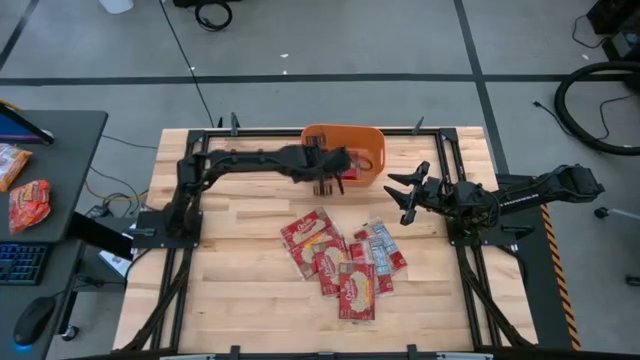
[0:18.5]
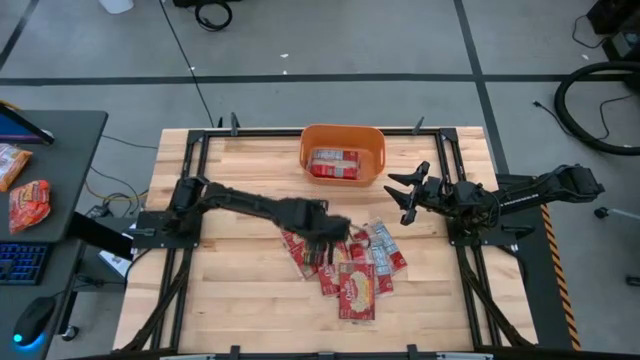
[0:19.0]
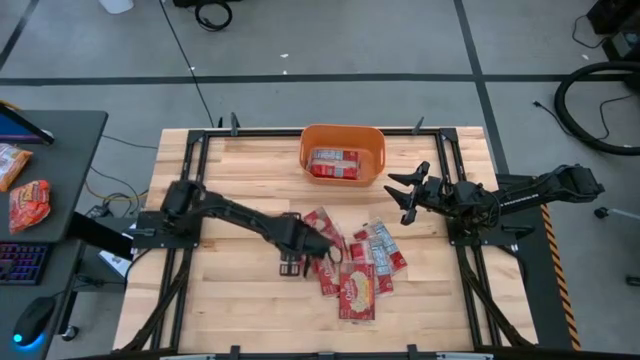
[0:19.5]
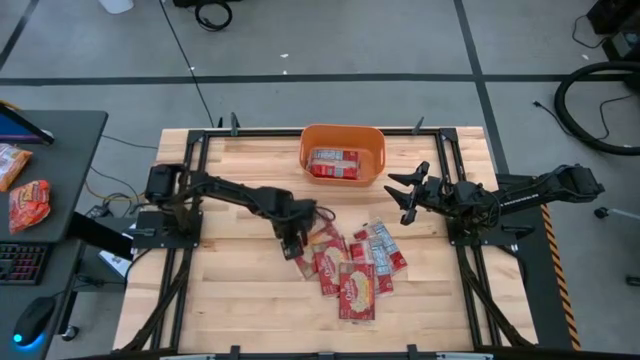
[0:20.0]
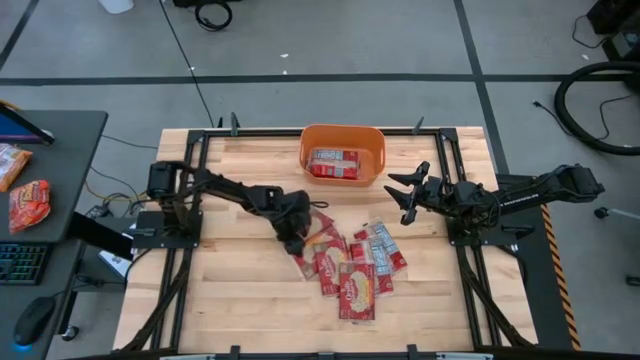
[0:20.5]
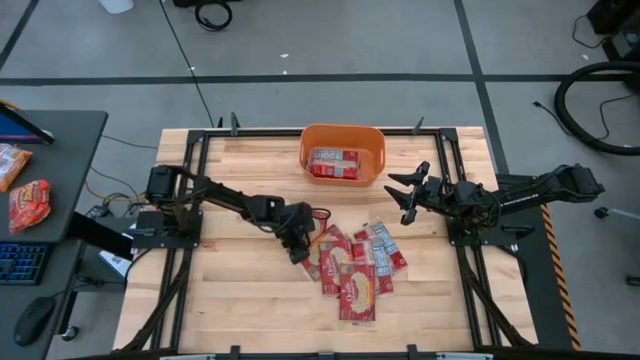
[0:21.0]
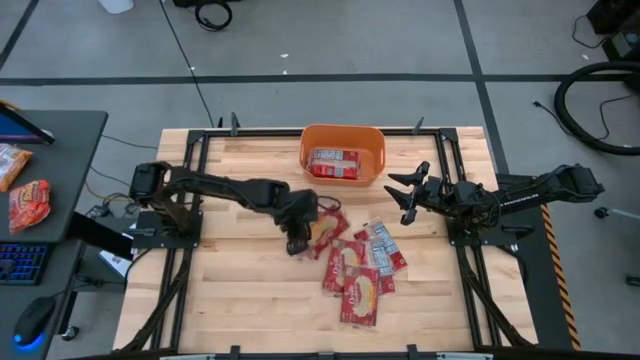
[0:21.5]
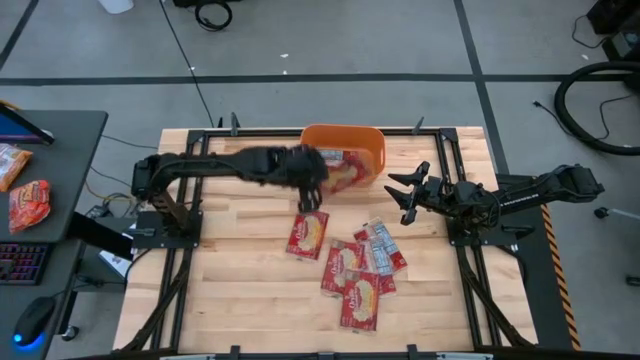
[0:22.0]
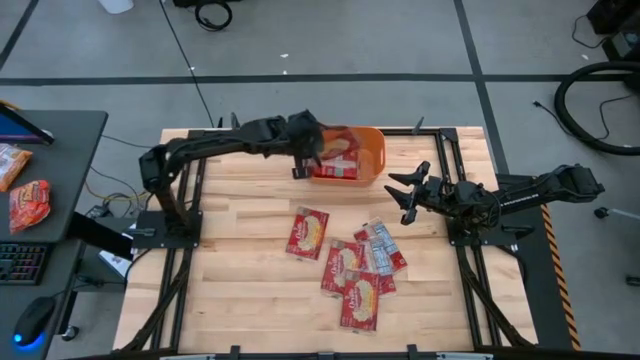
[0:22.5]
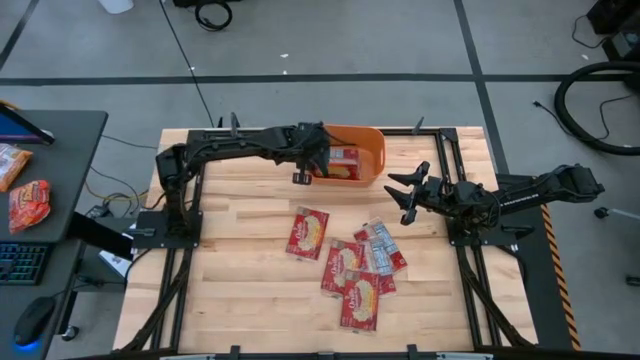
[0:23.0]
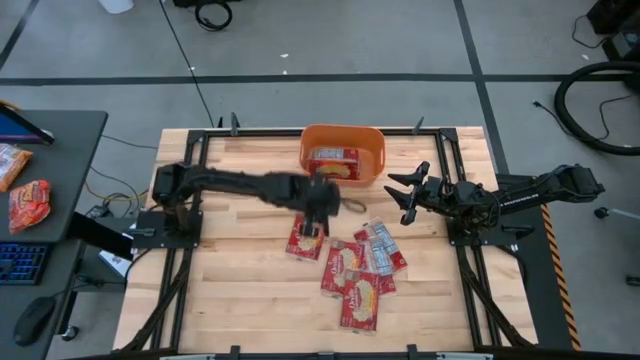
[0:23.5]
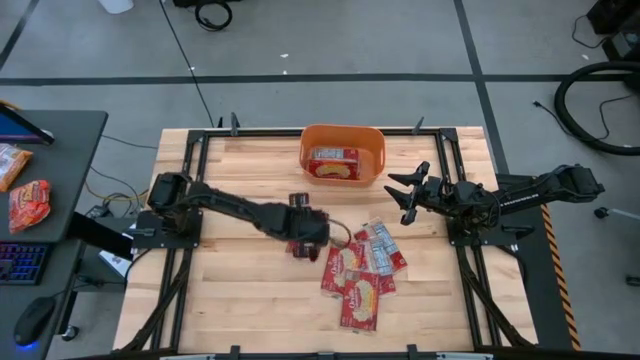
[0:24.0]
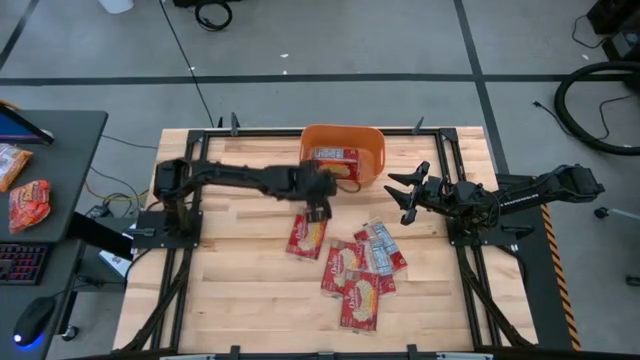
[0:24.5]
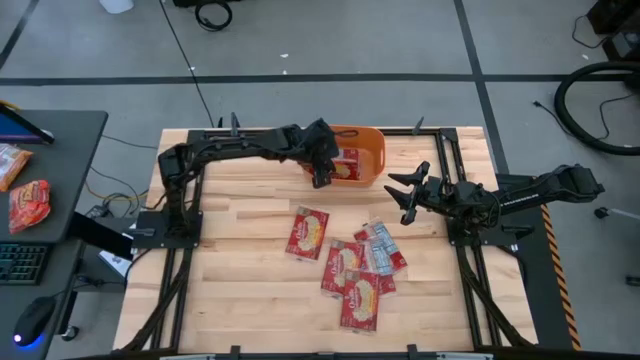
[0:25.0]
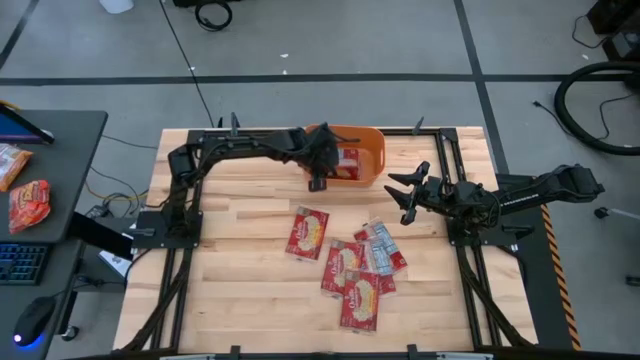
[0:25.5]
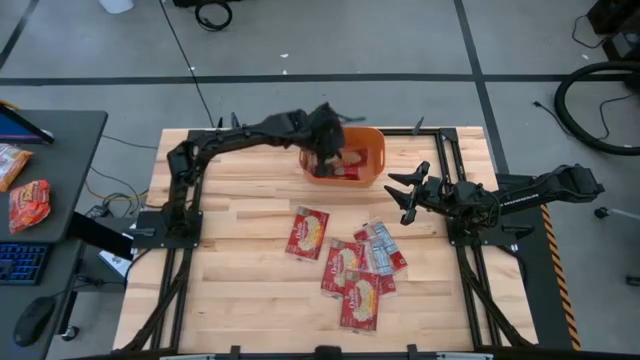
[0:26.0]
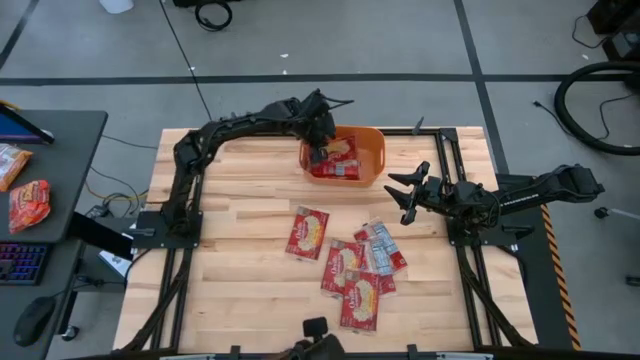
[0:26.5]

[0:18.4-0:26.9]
Task: Sort popcorn bags into baskets
Put the red popcorn bag into the orange bin

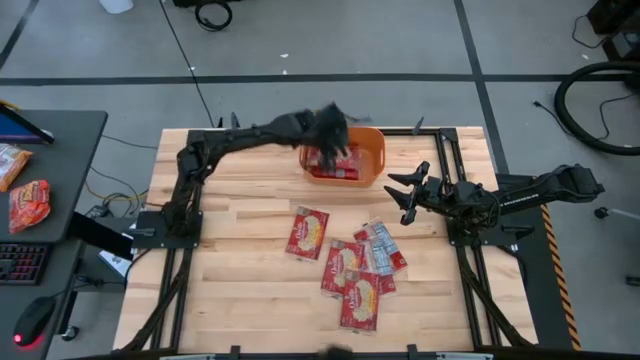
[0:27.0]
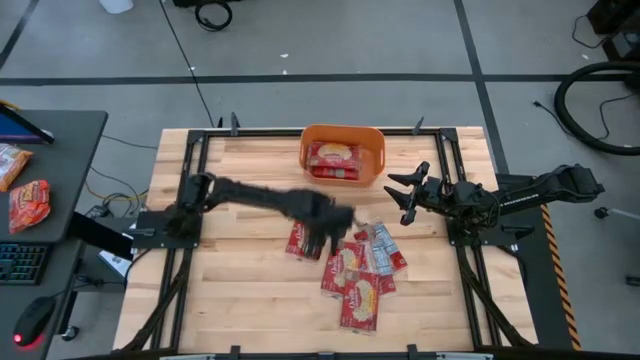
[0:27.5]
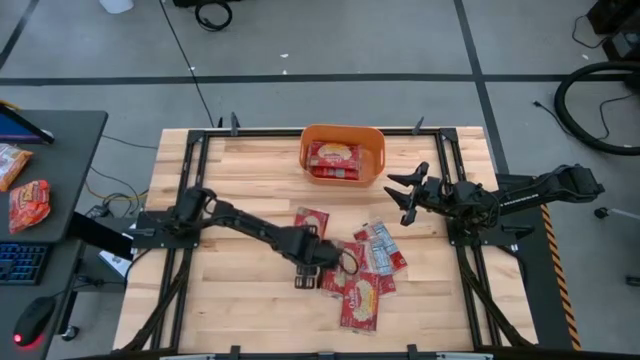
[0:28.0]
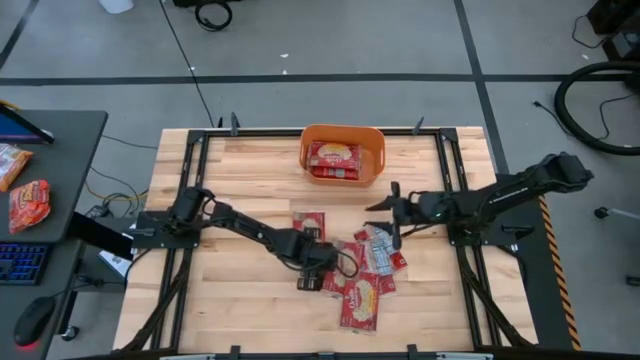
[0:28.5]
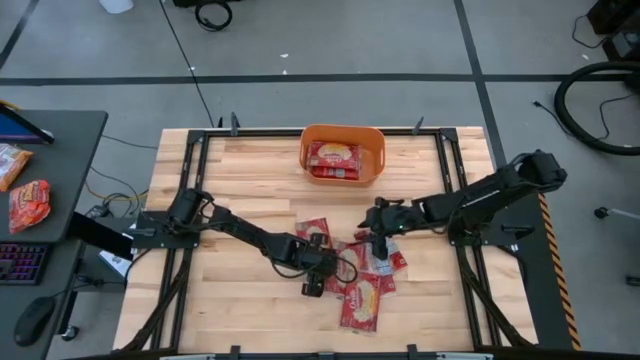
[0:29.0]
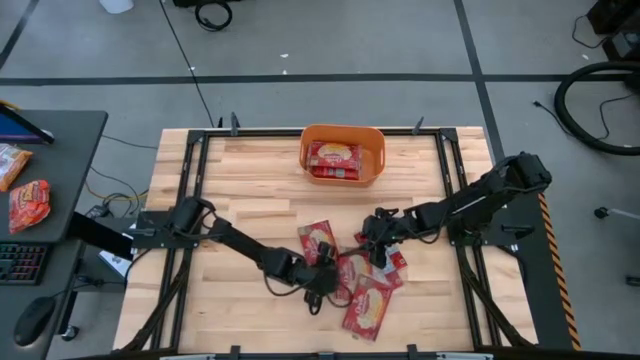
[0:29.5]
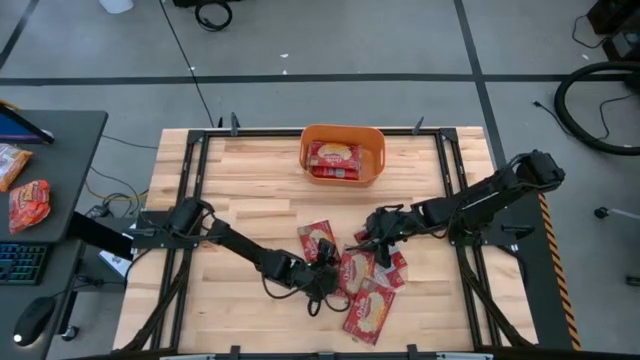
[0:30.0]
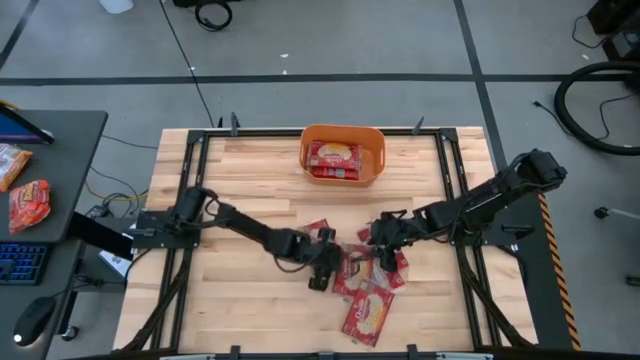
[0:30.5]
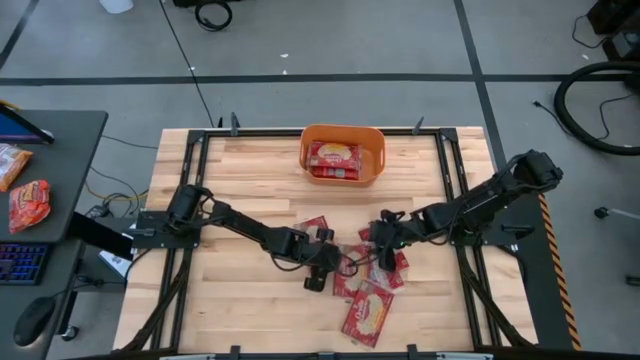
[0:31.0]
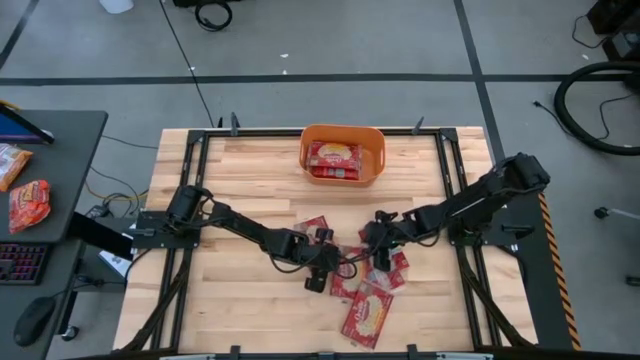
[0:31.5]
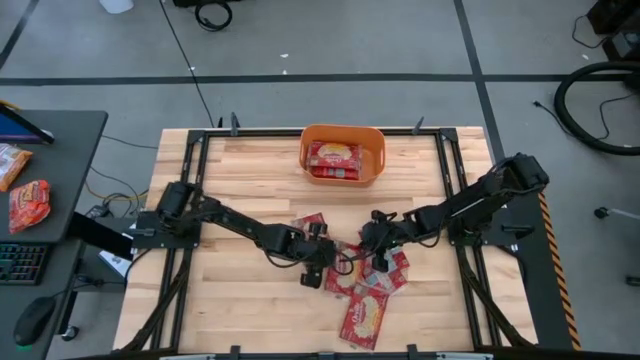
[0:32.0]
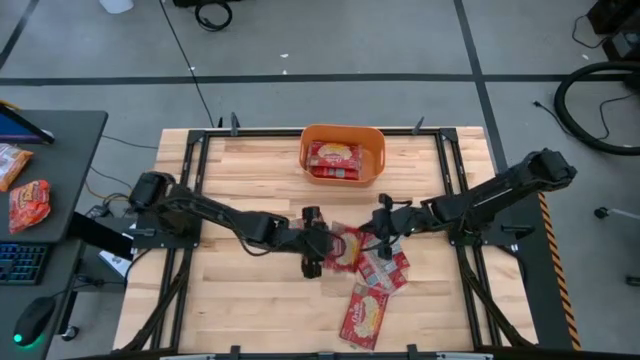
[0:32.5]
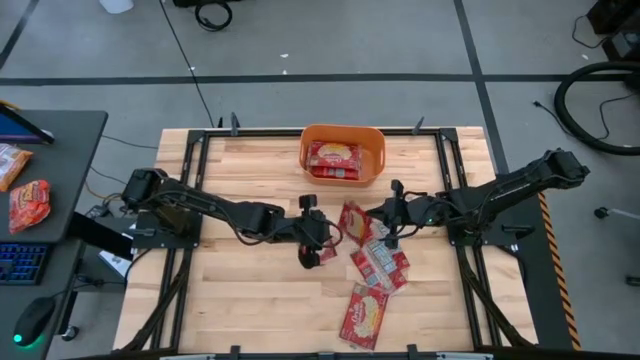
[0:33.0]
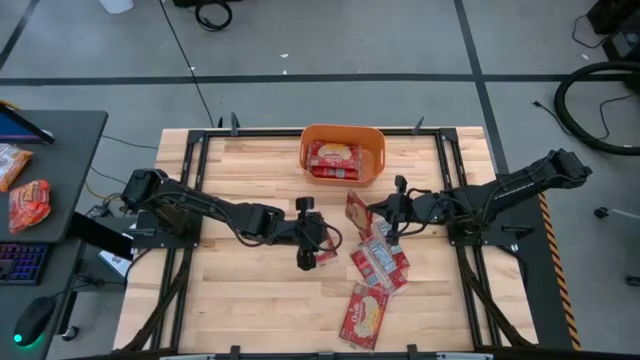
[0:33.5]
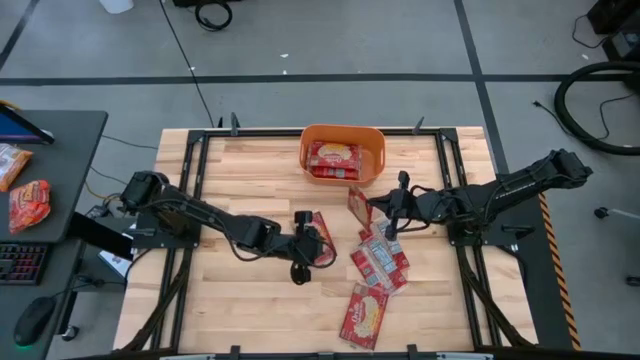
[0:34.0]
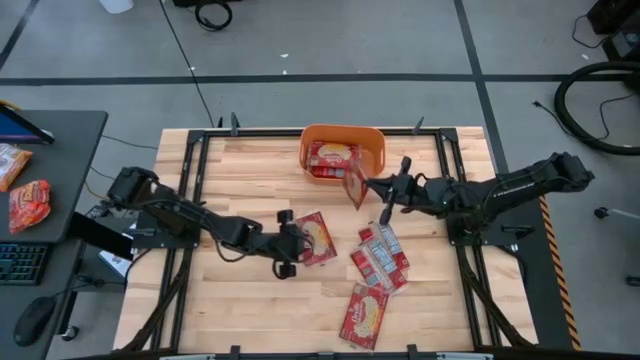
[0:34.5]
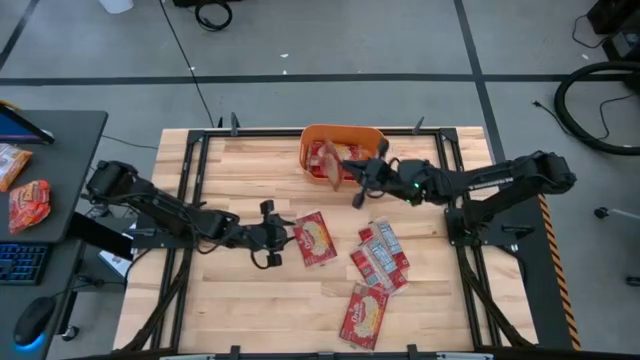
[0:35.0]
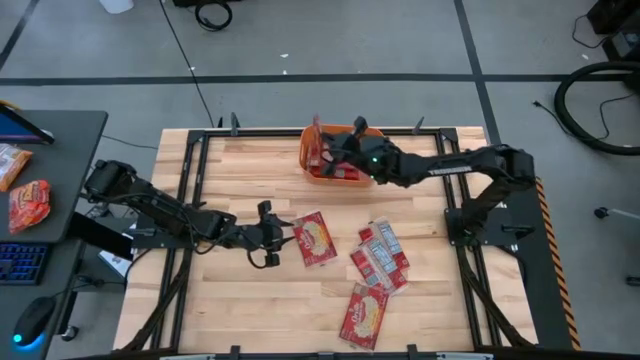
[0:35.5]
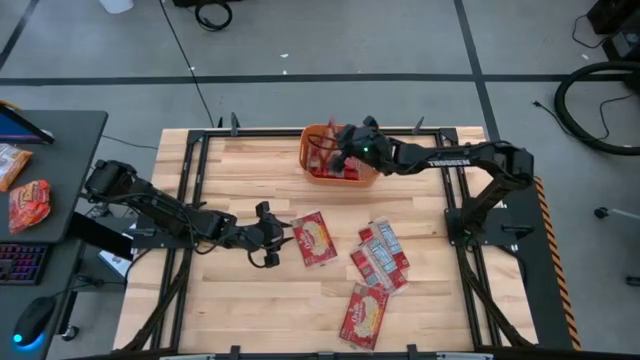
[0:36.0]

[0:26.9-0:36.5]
Put the red popcorn bag into the orange bin

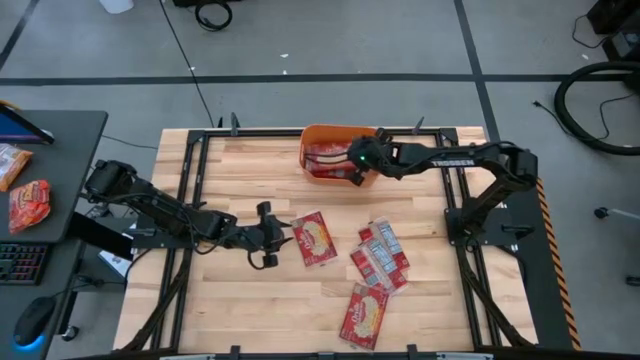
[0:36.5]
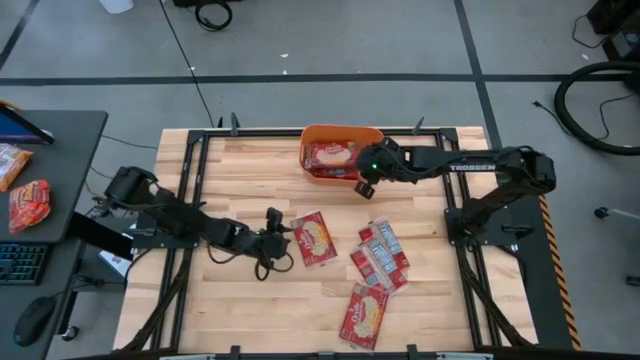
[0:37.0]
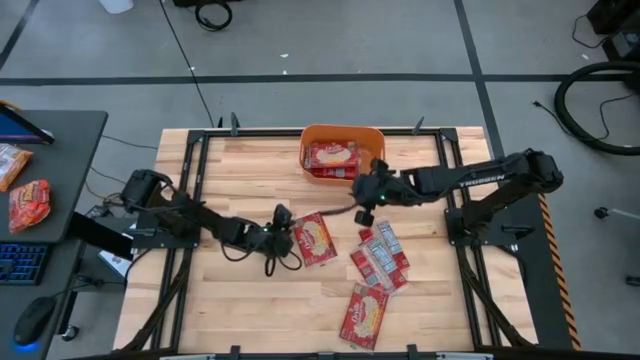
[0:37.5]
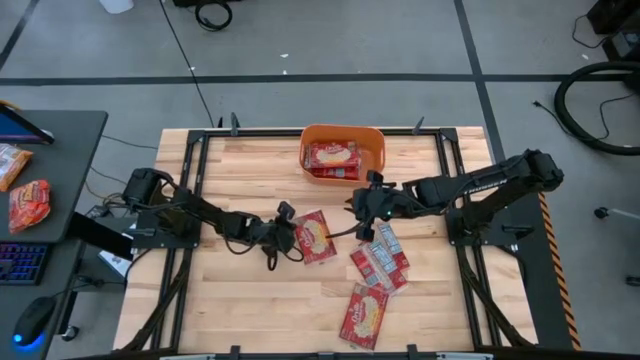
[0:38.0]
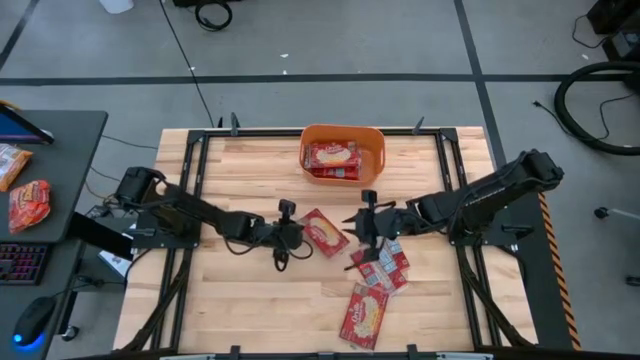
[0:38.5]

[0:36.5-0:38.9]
Put the red popcorn bag into the orange bin

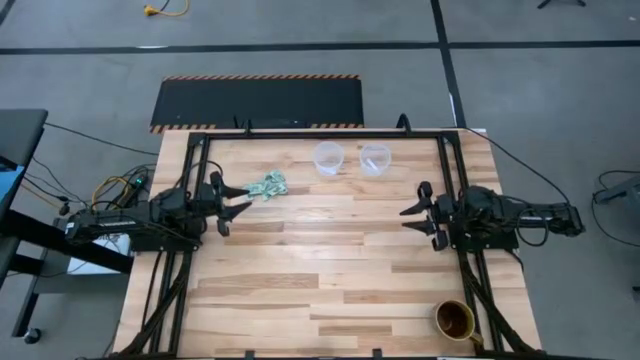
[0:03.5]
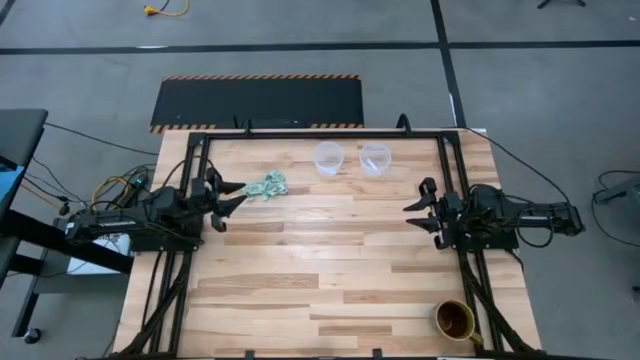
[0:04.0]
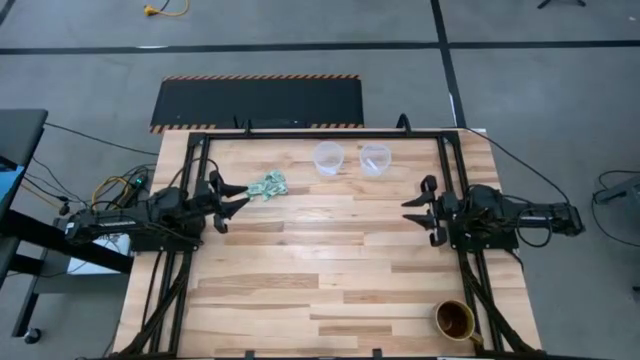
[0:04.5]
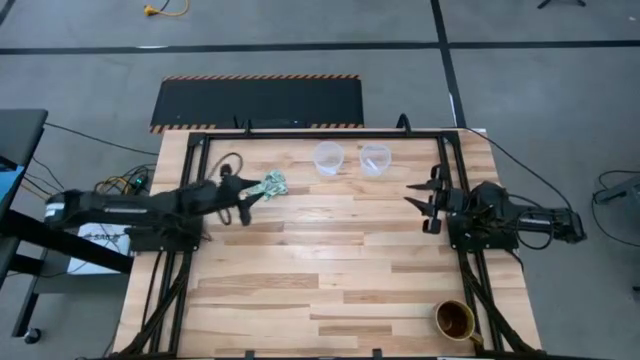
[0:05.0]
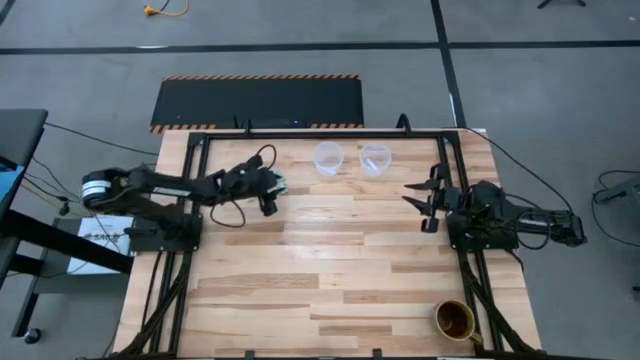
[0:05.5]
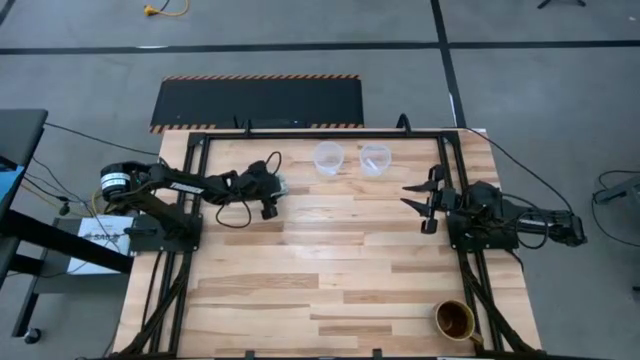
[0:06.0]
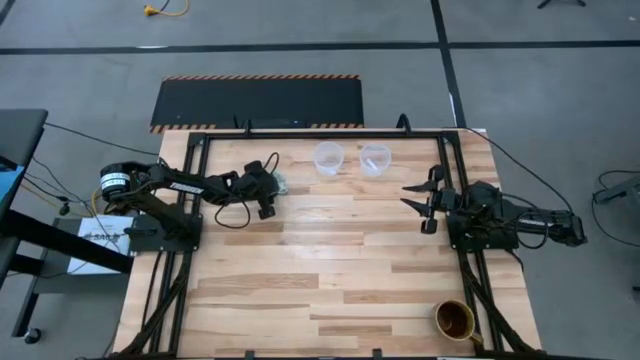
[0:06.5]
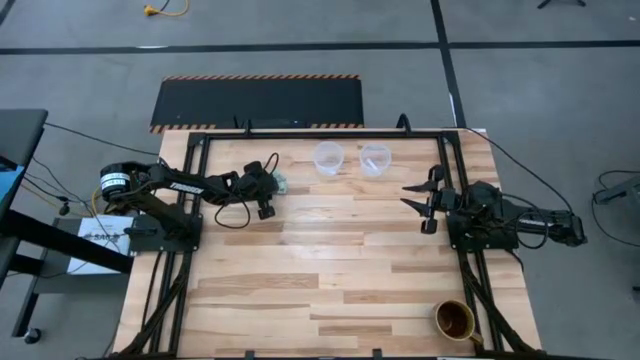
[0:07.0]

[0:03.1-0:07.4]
Task: Pick and place Stevia / Truvia into bins
Put the stevia packet into the left transparent container
